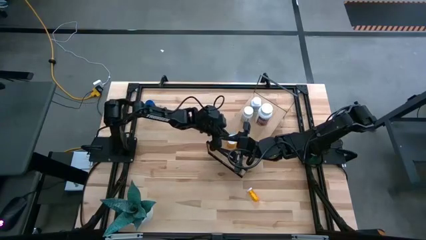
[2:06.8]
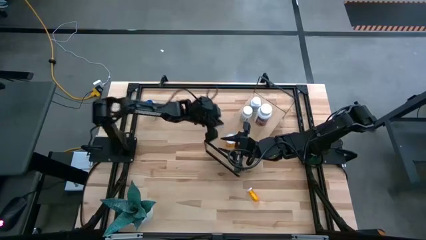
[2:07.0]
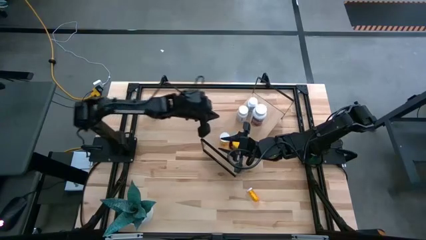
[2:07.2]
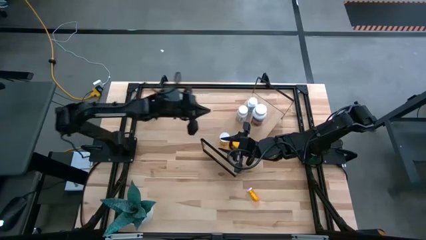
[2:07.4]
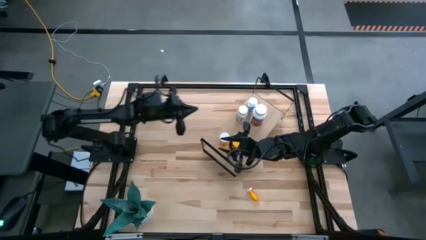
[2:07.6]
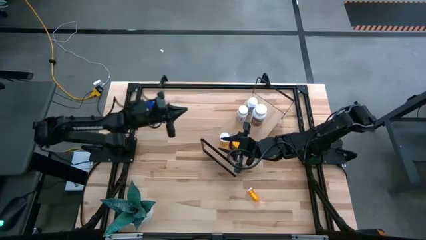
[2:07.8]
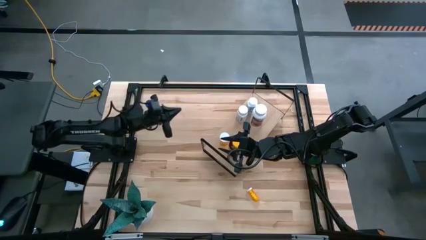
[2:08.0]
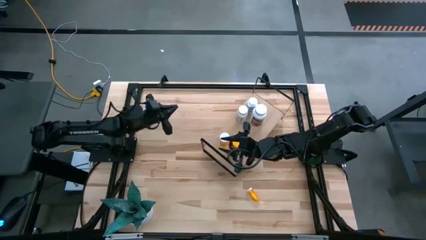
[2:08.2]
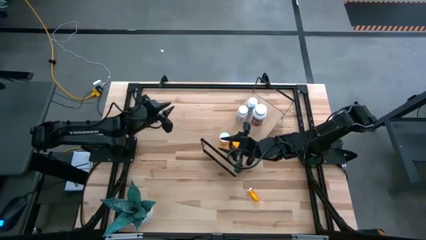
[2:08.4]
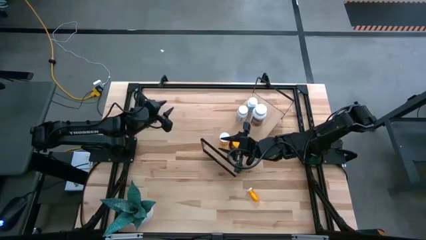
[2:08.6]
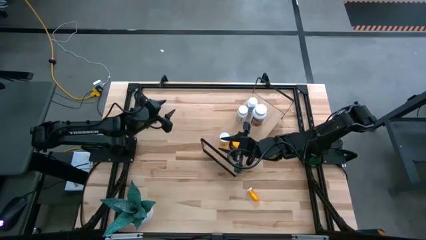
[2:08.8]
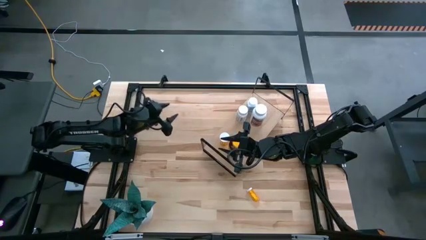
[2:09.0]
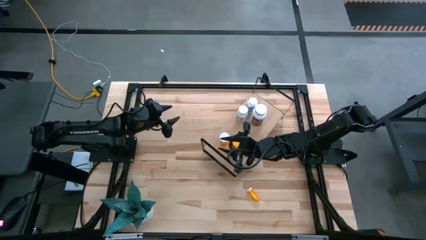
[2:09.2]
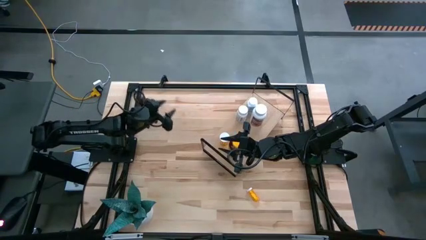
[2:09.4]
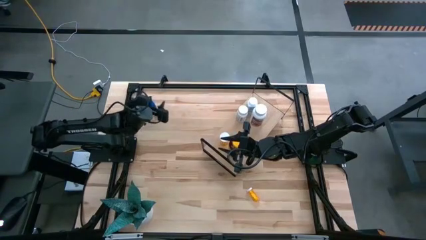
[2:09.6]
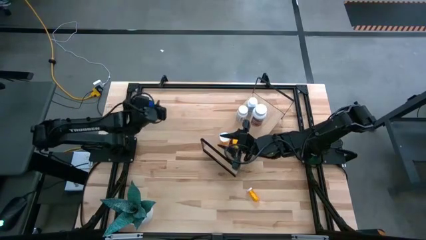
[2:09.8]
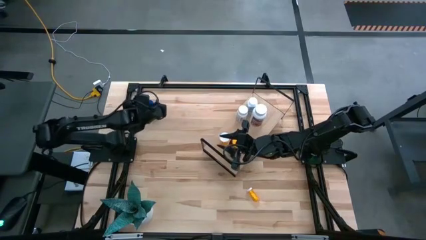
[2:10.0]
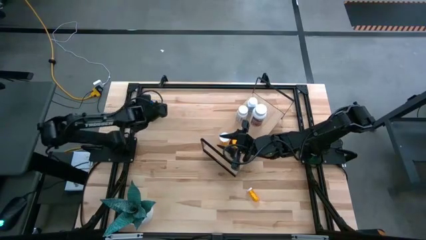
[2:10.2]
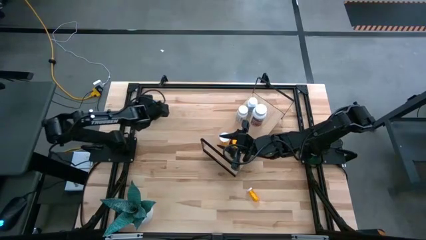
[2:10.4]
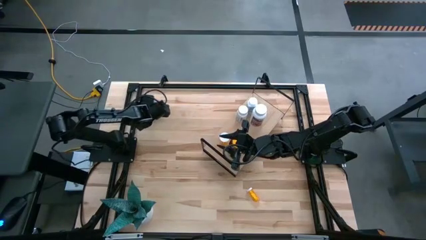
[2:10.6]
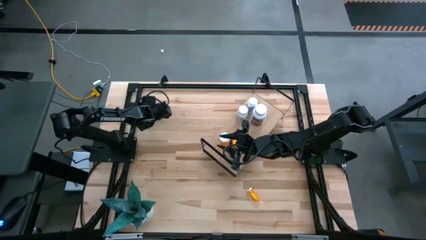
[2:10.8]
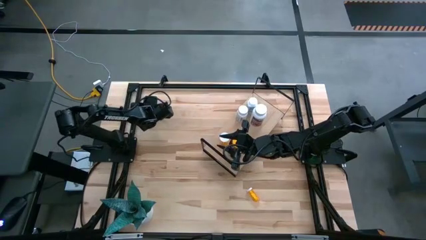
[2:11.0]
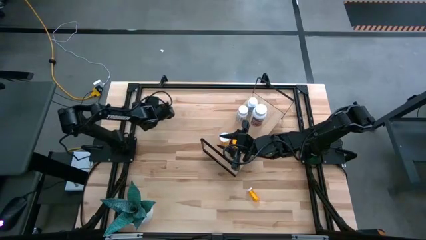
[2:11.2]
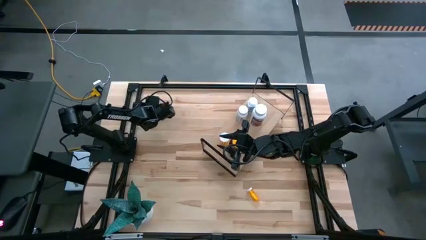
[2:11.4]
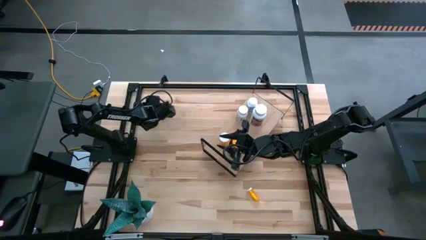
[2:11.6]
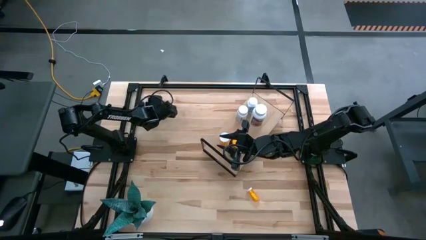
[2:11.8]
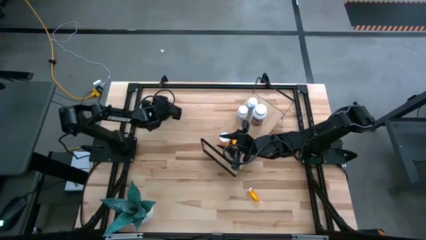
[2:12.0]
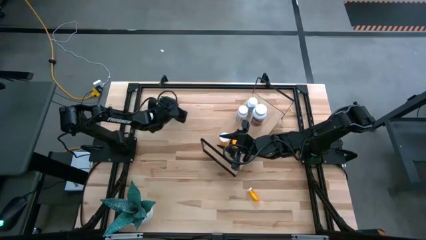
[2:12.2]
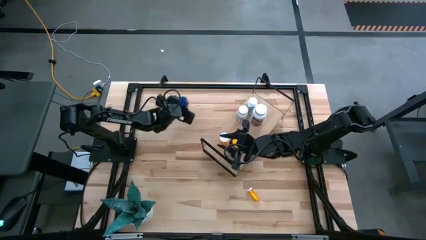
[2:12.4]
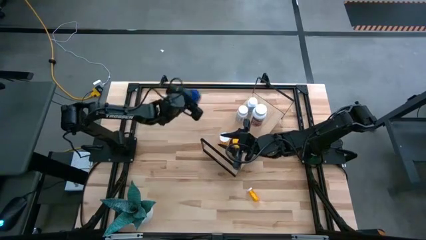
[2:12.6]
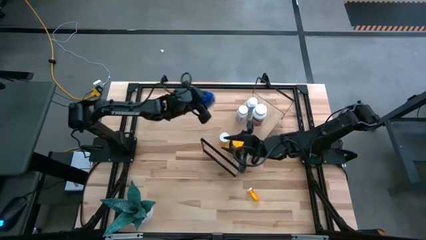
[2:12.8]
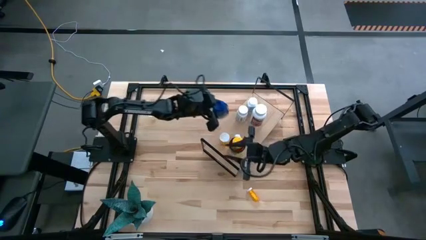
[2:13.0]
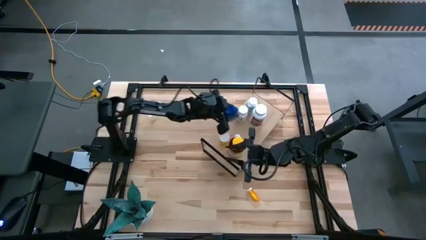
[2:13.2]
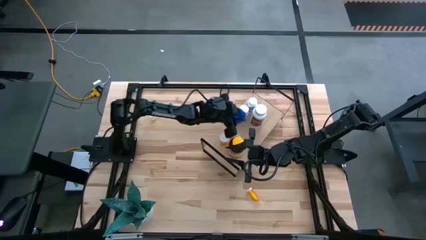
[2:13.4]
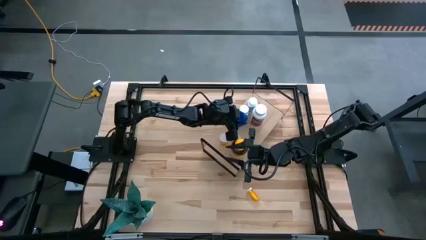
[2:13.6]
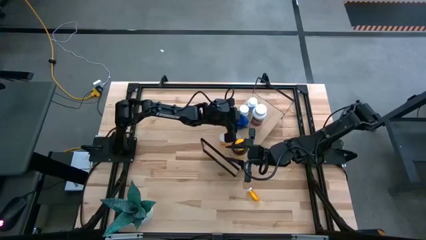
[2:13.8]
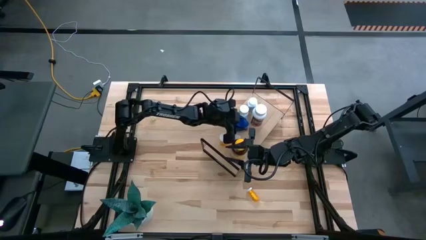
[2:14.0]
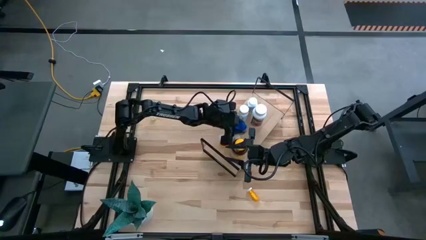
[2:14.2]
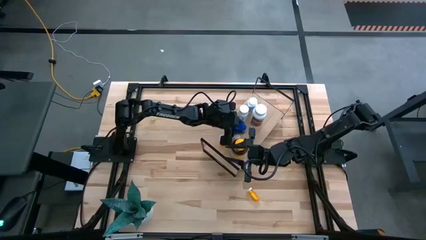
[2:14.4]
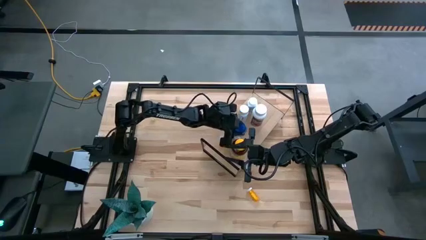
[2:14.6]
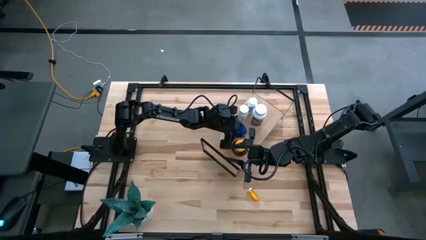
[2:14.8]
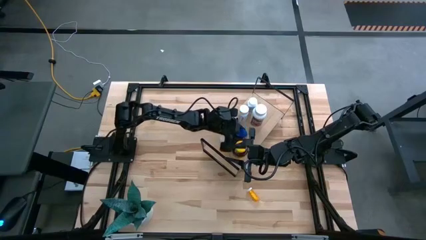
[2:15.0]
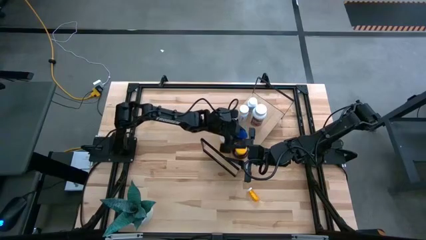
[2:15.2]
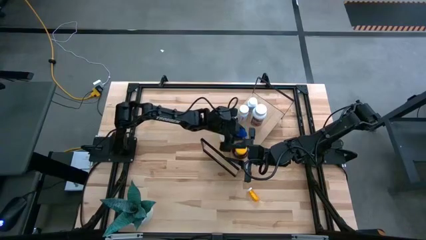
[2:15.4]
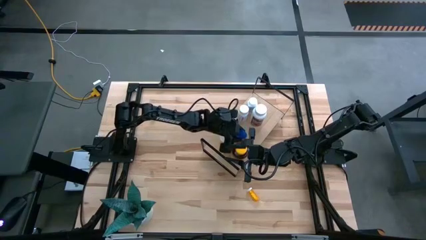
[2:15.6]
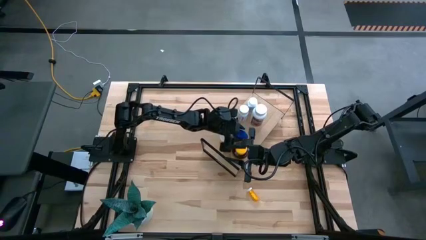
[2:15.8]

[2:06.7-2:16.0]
Task: Pick and place medicine bottles onto shelf by color
Put the blue medicine bottle on the shelf

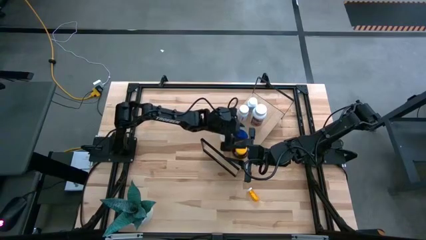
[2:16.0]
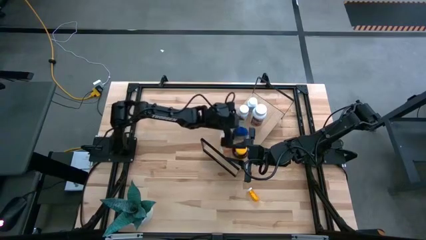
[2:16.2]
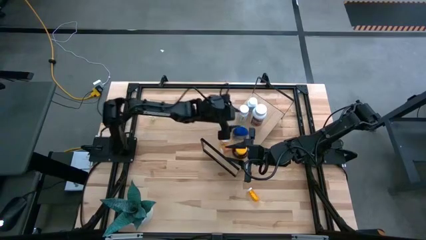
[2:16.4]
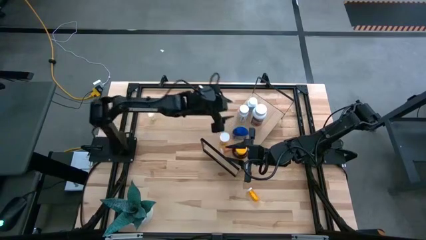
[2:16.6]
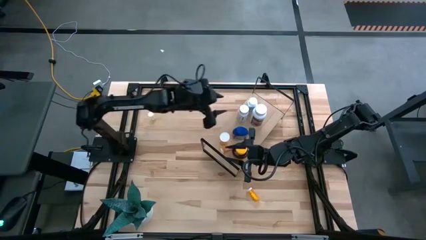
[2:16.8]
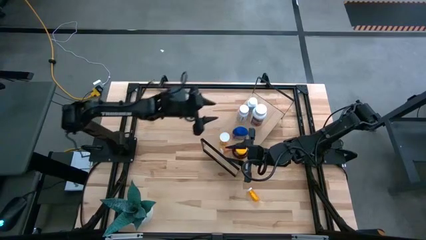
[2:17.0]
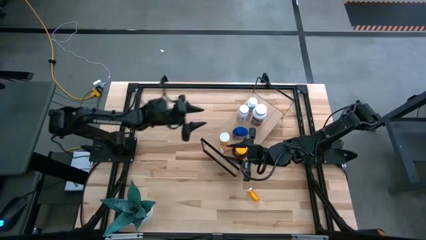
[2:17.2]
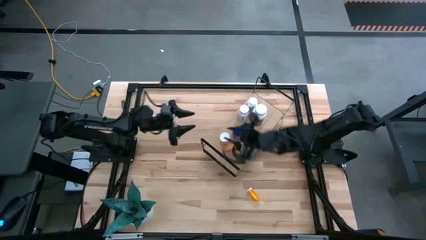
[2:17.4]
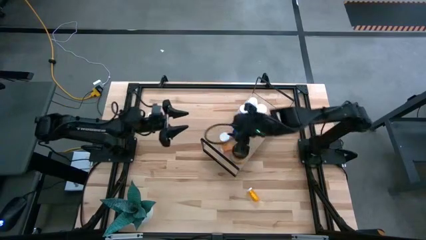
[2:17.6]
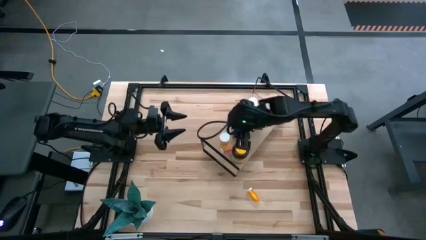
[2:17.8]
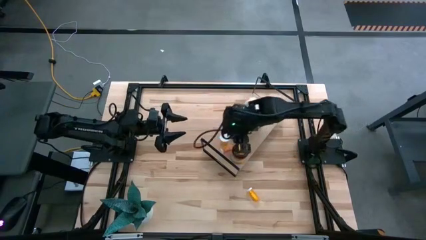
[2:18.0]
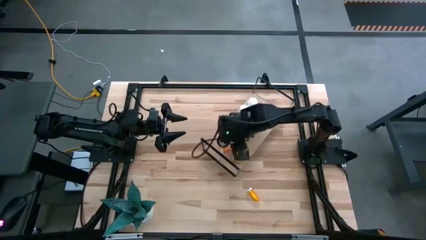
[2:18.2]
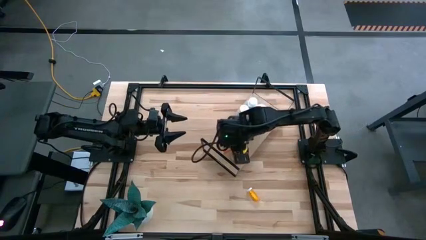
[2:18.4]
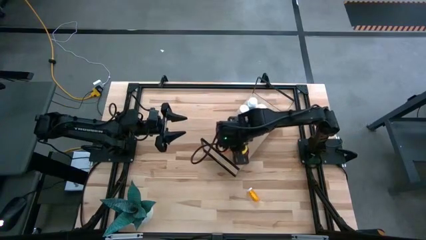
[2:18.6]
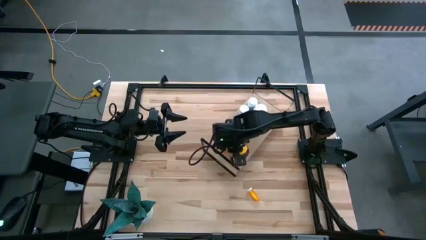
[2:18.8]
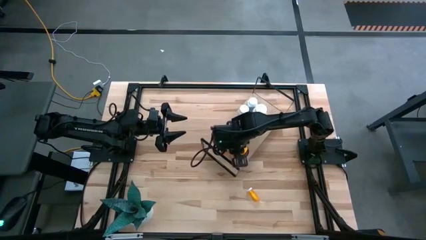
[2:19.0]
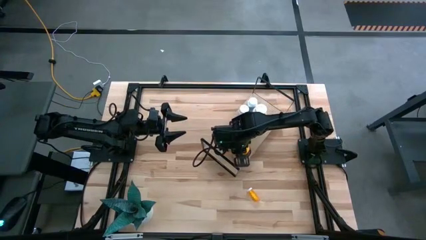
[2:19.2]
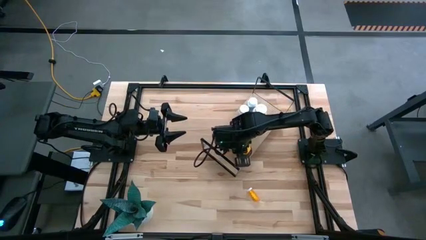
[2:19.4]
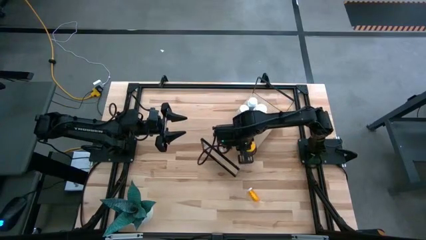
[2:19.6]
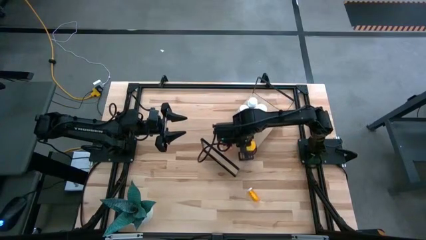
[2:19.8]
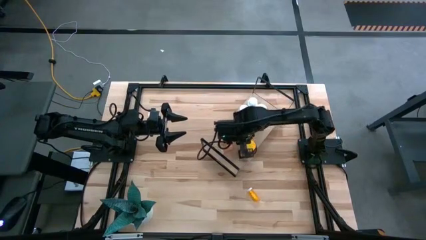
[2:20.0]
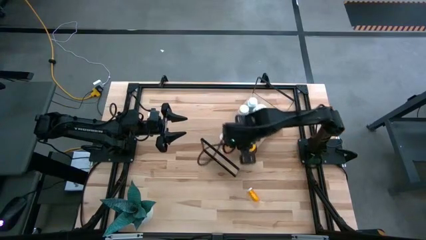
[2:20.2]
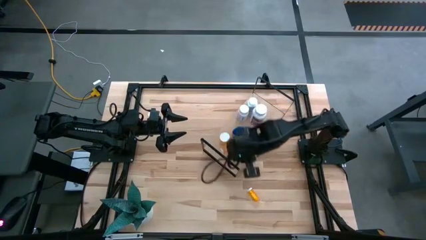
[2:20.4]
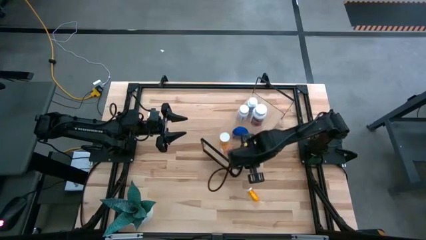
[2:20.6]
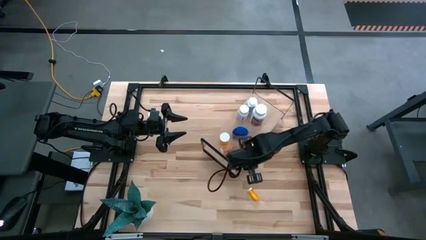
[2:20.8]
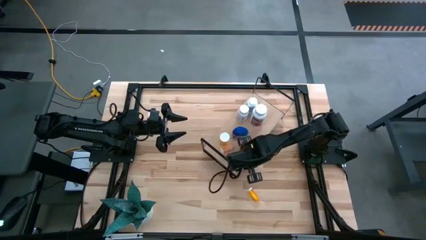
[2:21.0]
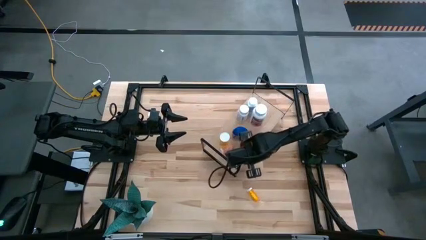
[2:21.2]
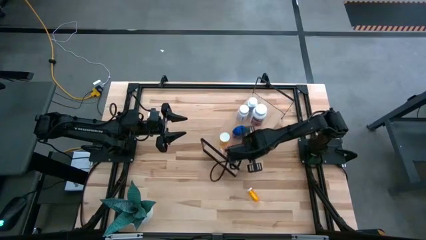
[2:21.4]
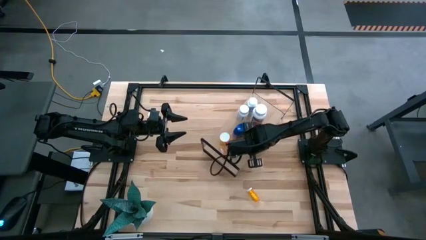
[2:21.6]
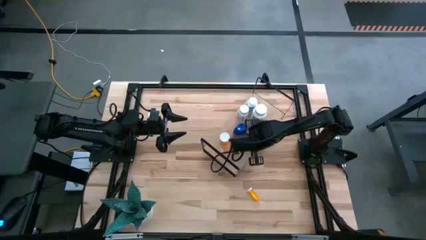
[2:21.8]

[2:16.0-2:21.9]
Adjust the yellow medicine bottle on the shelf
